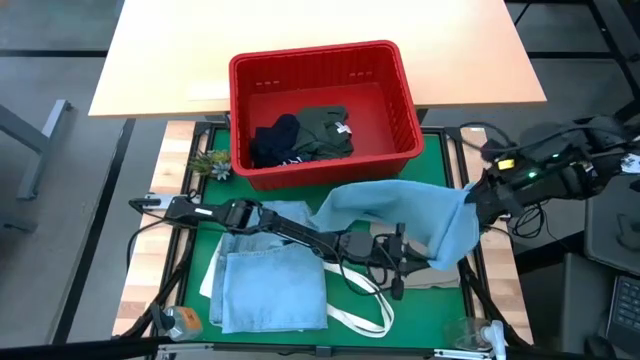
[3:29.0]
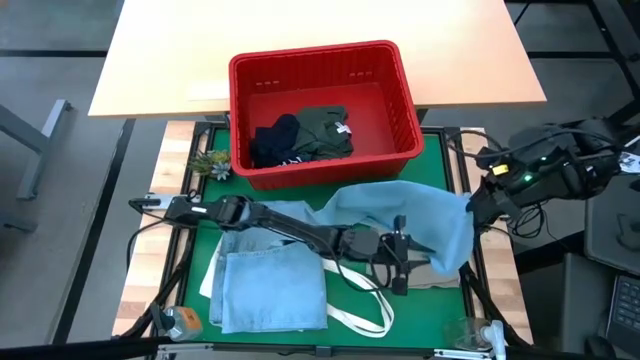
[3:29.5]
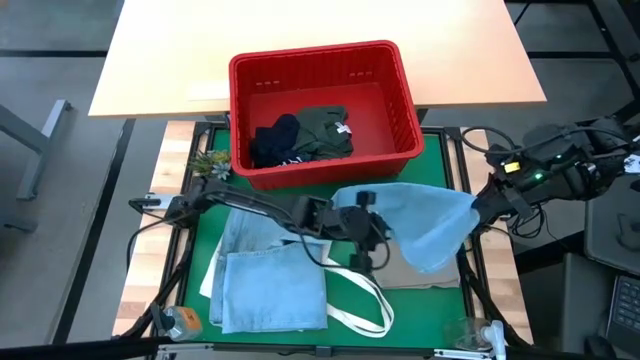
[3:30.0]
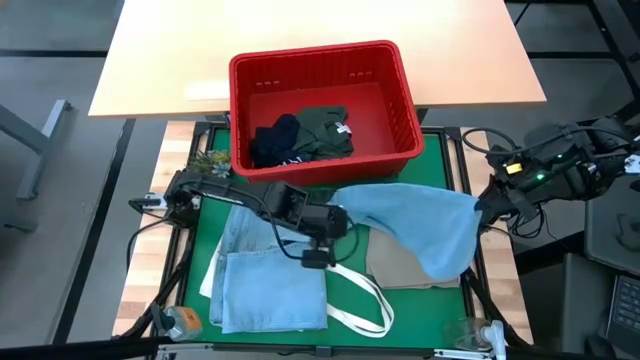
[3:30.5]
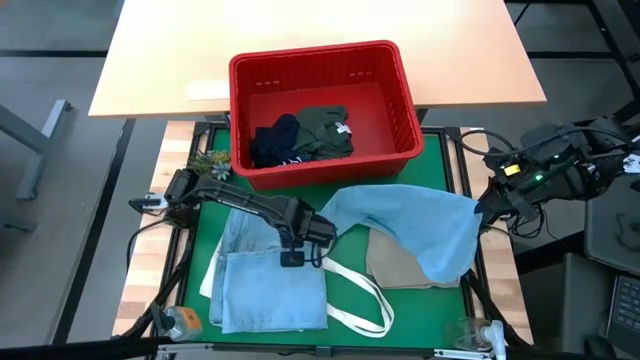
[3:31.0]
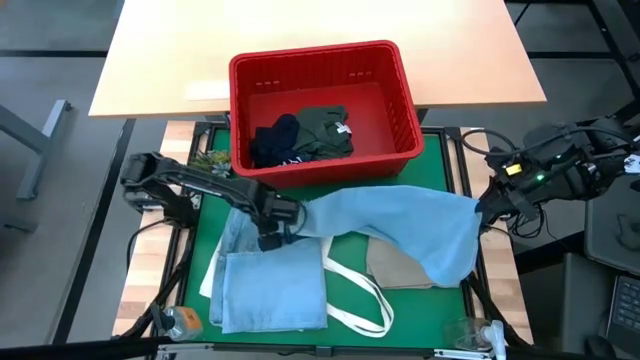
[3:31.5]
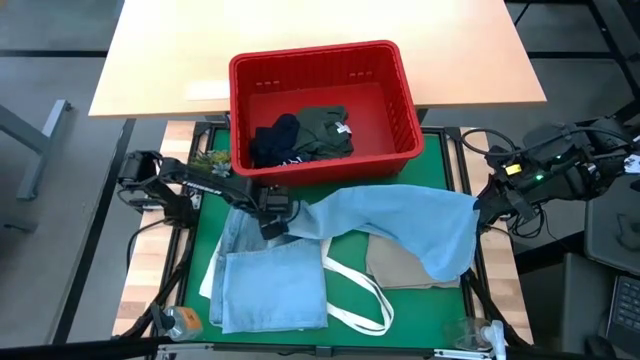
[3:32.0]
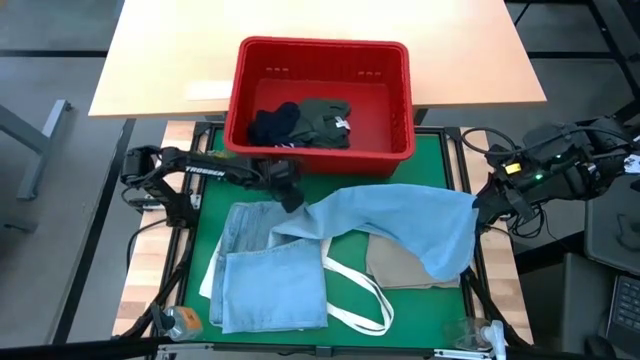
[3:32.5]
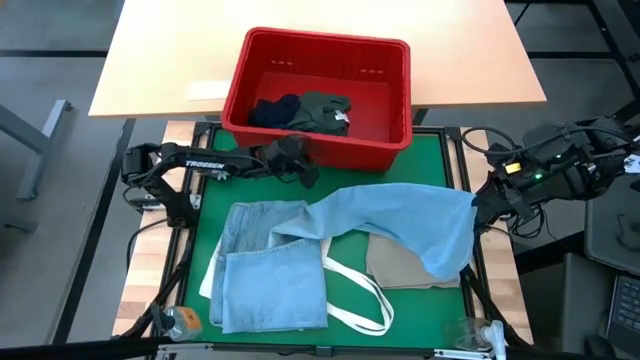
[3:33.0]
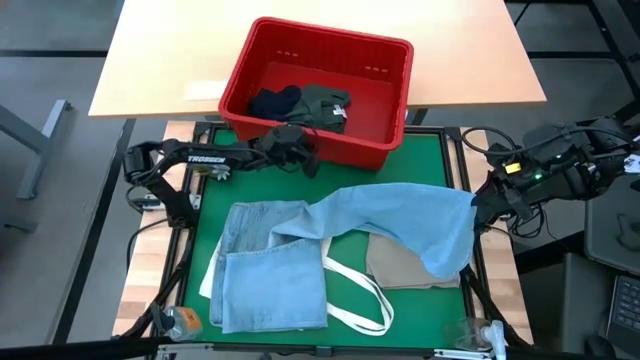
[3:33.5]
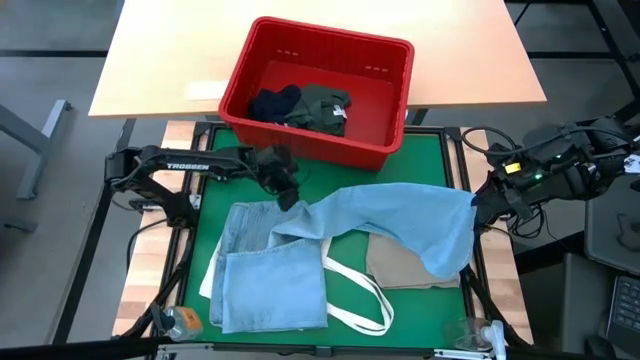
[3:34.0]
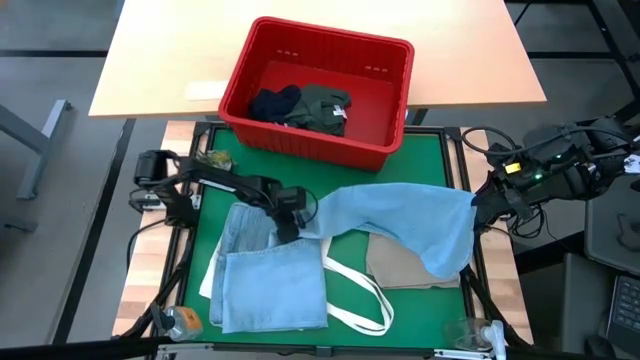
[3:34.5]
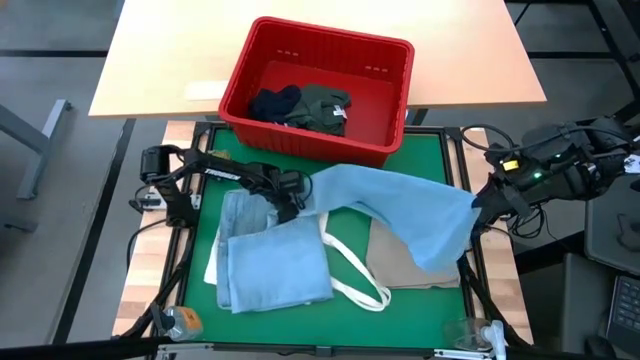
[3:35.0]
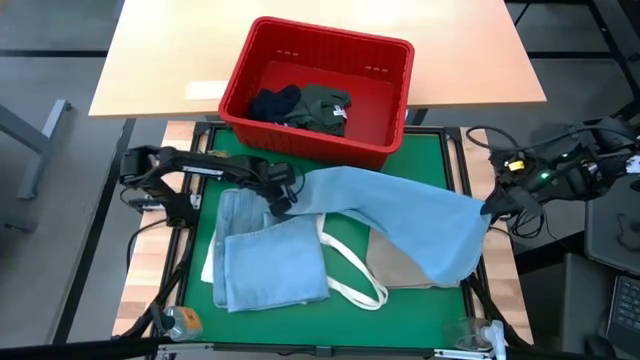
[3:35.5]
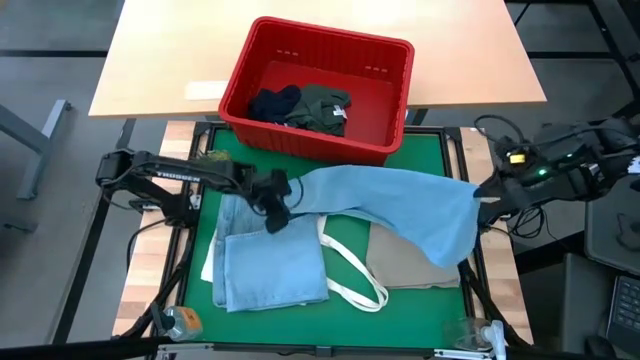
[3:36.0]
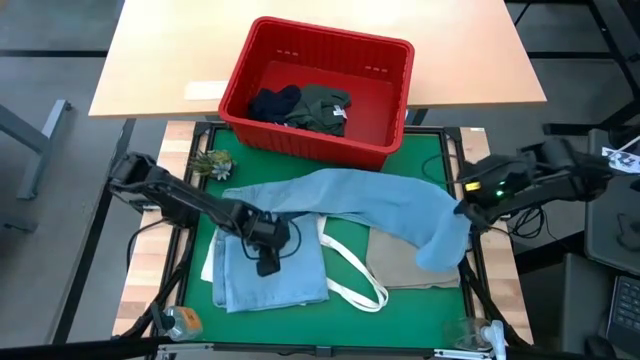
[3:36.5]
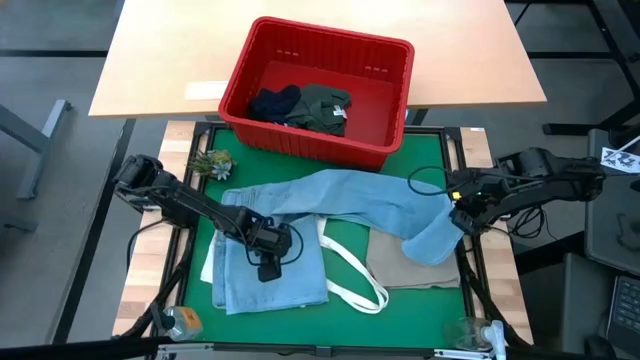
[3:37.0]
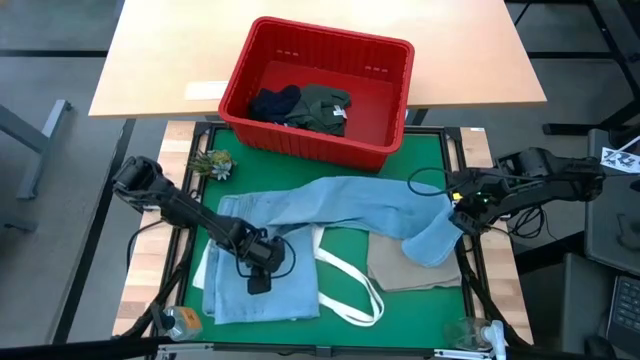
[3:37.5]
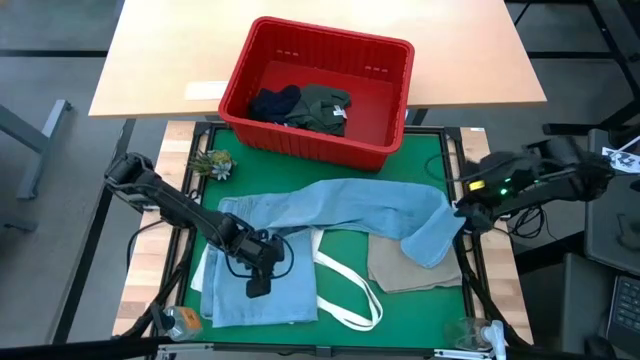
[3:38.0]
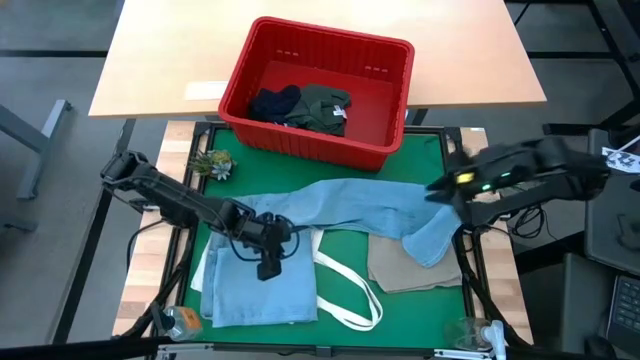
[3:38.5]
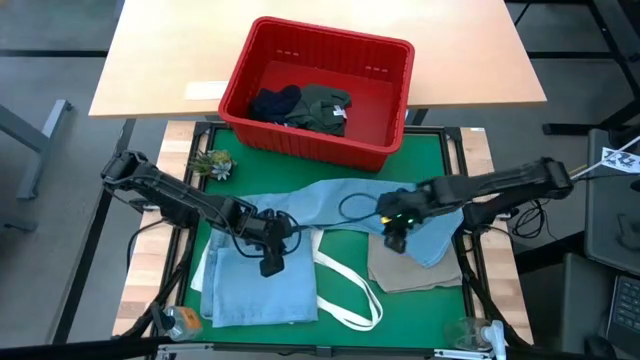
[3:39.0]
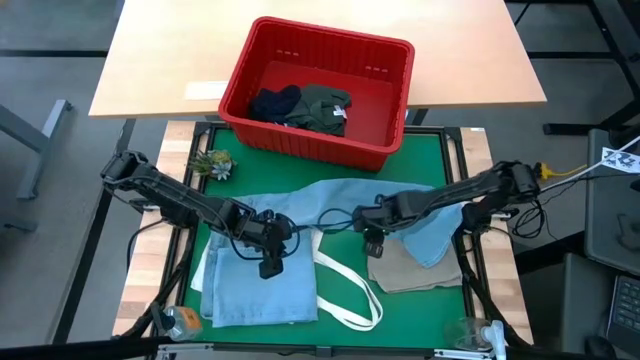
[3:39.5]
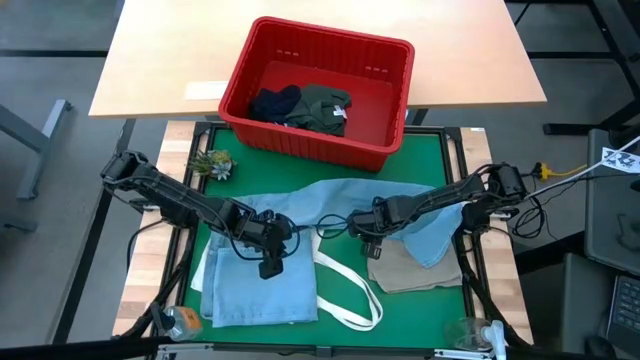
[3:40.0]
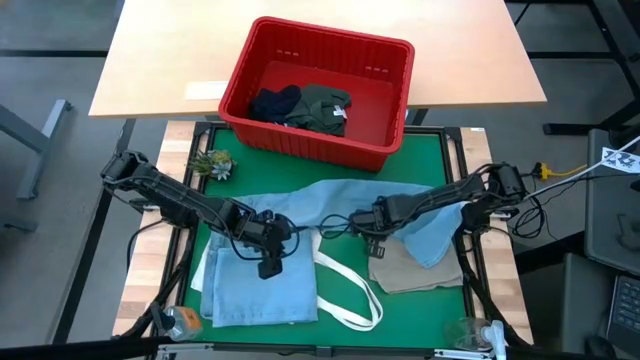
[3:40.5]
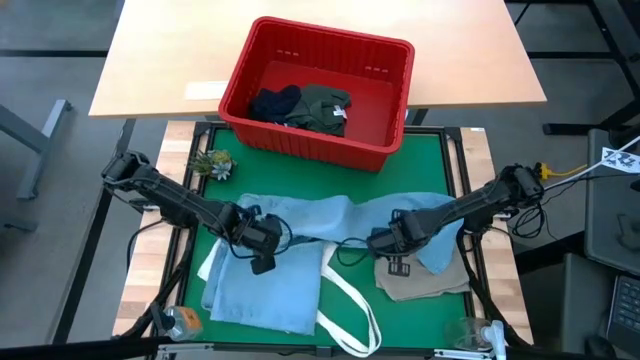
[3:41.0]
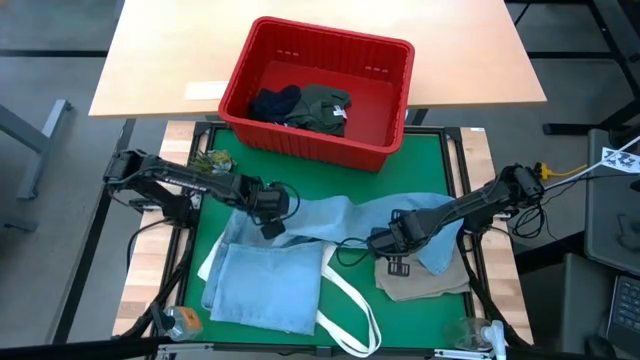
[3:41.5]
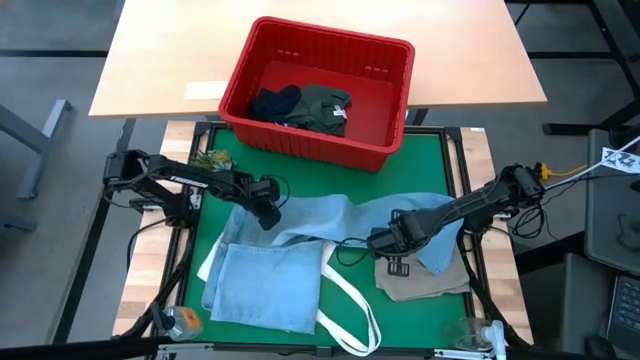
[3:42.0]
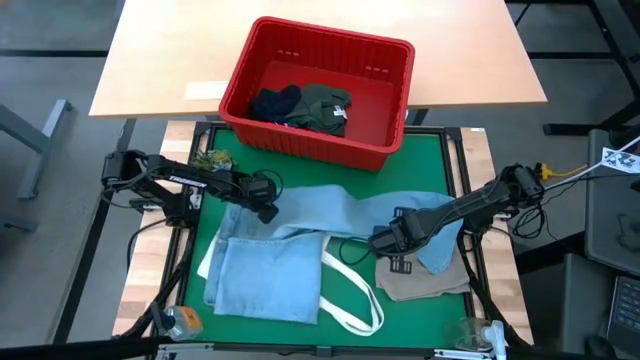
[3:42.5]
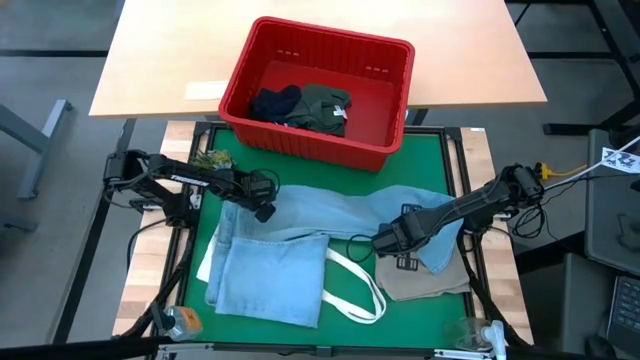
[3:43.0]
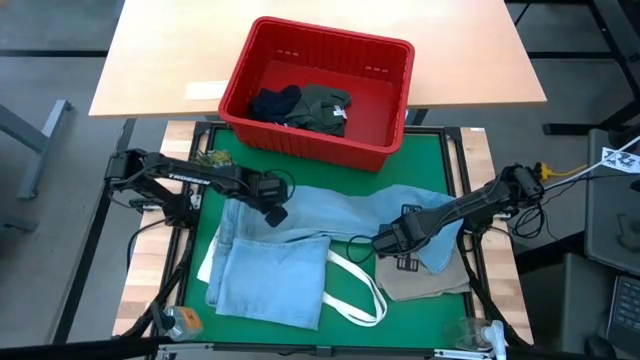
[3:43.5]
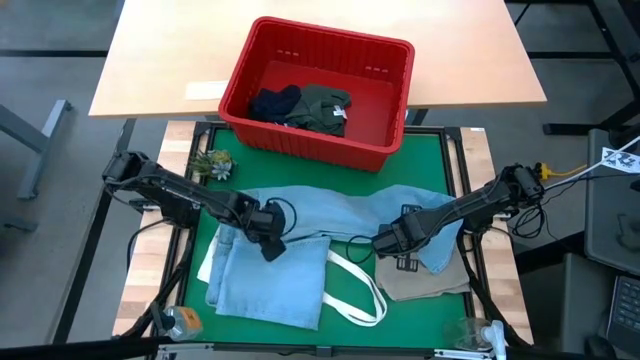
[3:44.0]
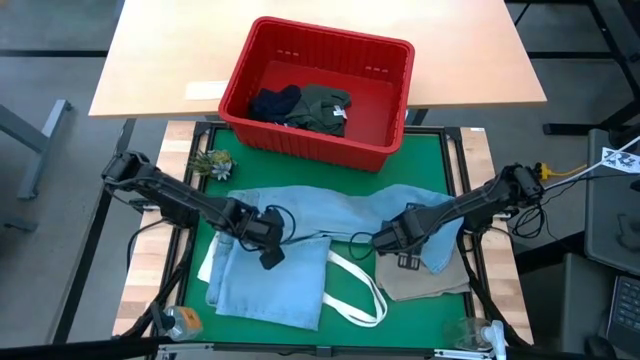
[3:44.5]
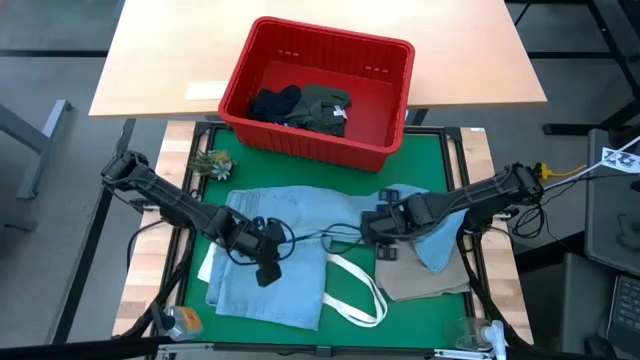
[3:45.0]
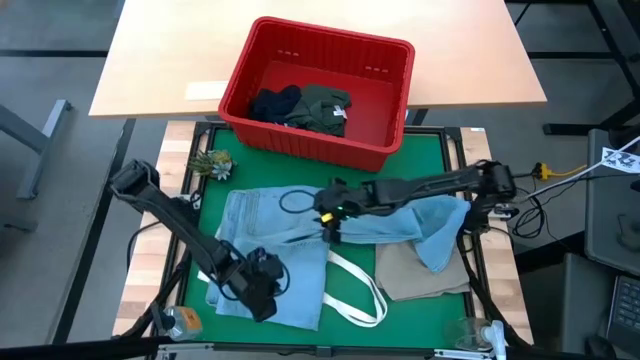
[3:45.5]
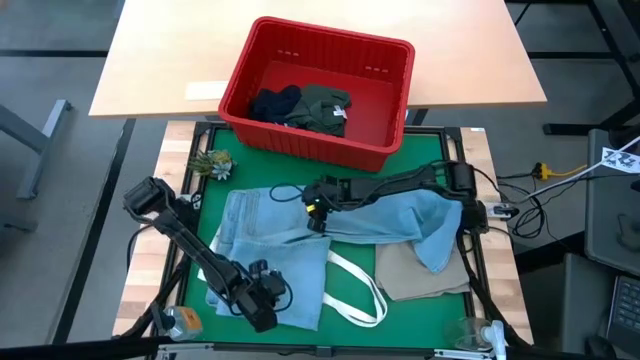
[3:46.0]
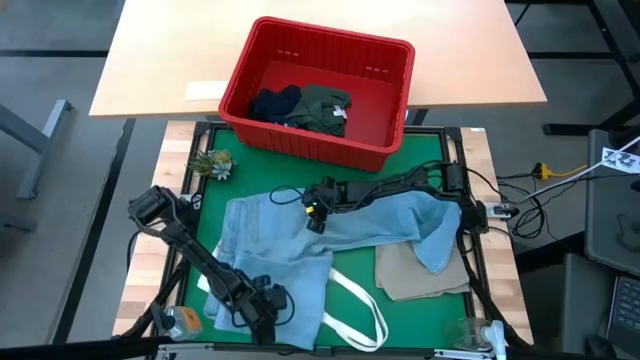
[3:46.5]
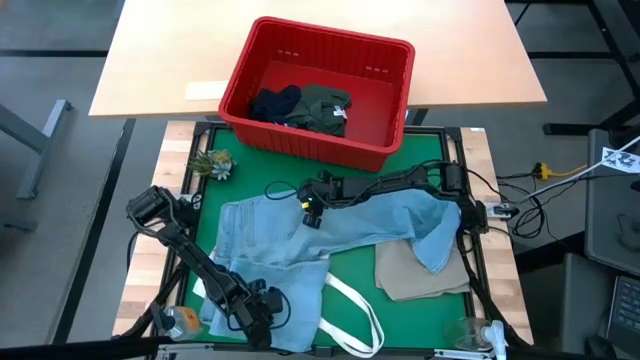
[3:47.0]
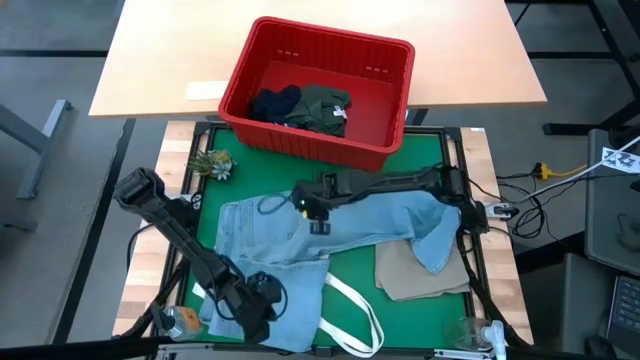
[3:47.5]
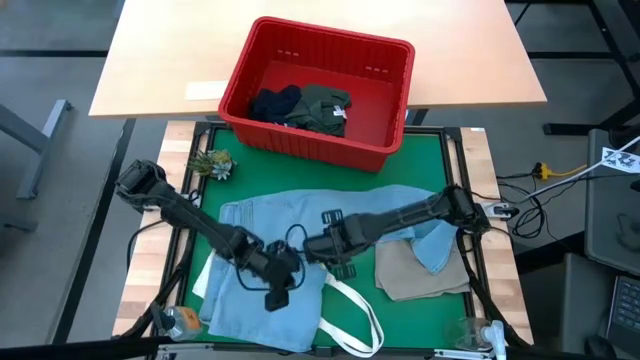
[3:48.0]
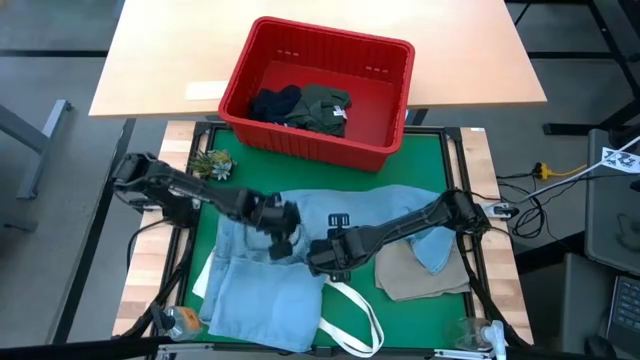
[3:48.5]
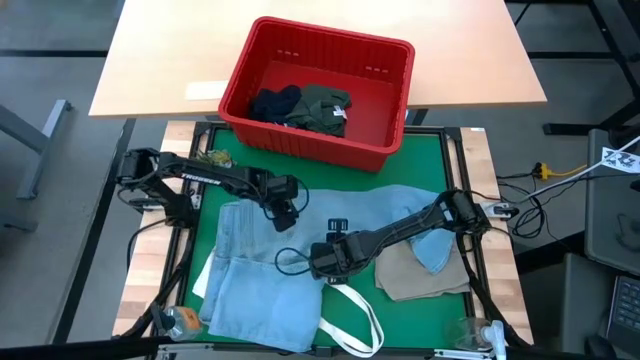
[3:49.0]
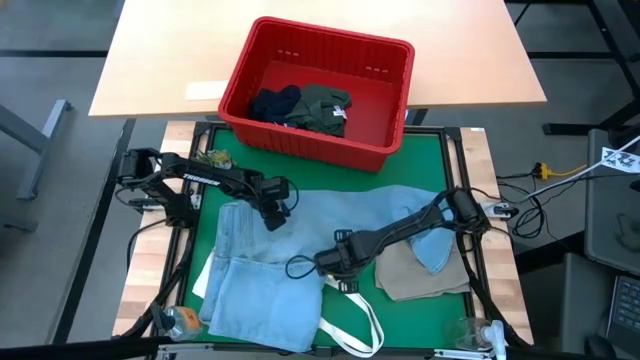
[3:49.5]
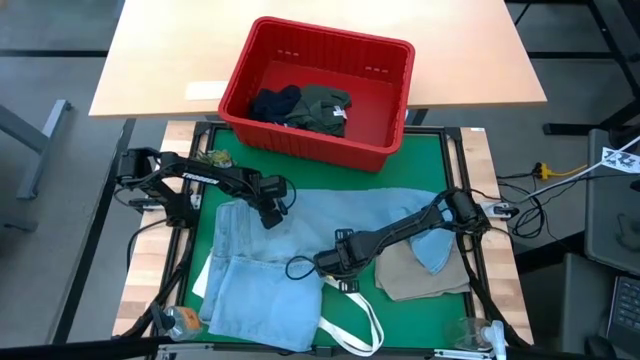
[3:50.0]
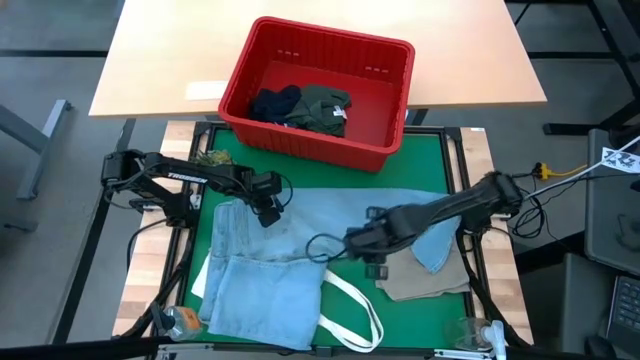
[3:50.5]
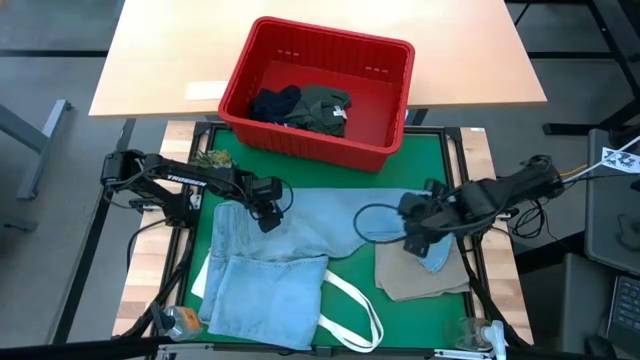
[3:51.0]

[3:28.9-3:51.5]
Task: Fold Laundry from Bin
Fold the light blue pants
